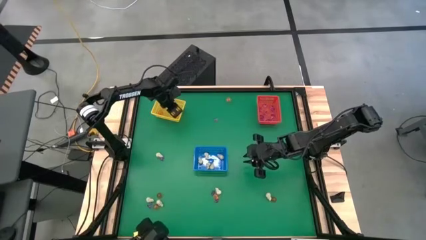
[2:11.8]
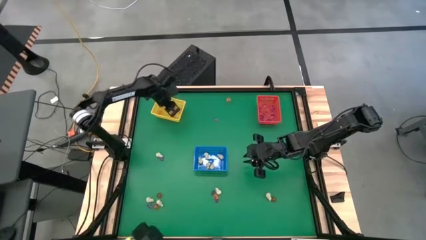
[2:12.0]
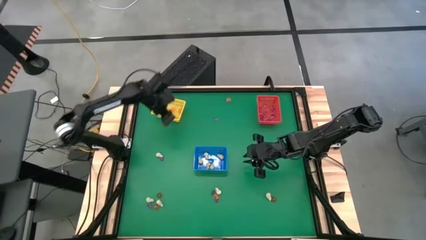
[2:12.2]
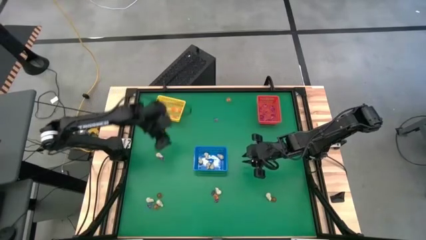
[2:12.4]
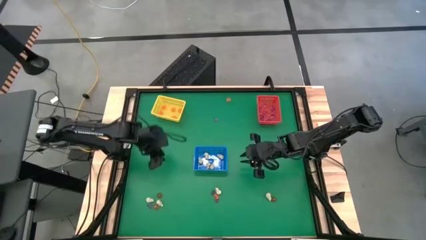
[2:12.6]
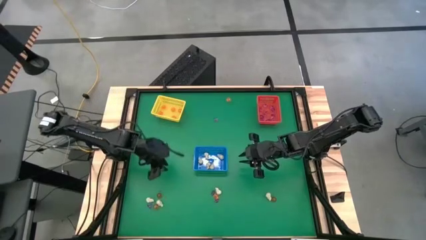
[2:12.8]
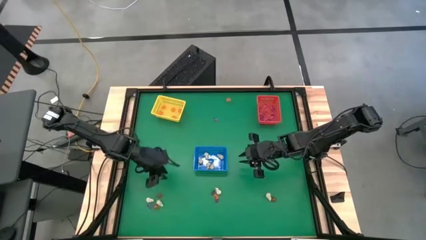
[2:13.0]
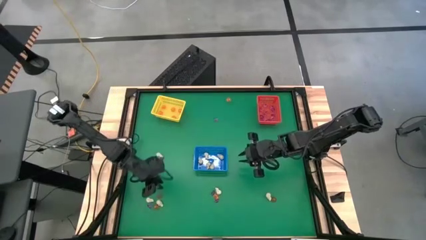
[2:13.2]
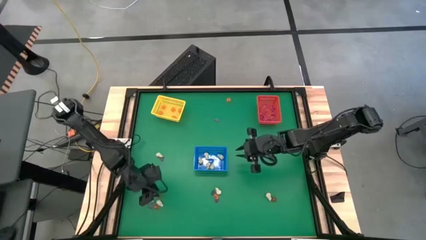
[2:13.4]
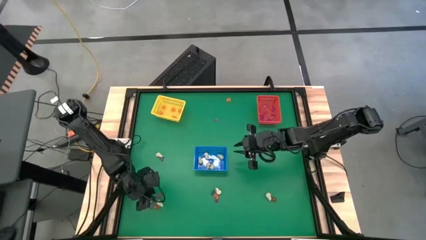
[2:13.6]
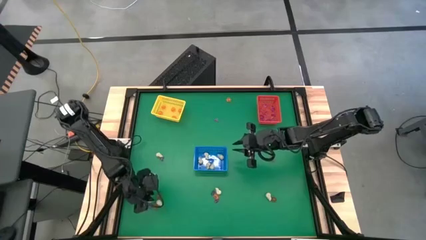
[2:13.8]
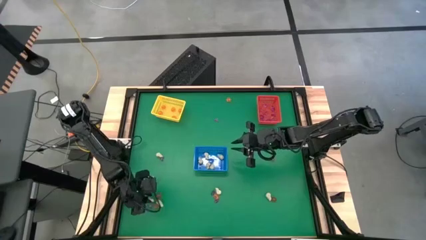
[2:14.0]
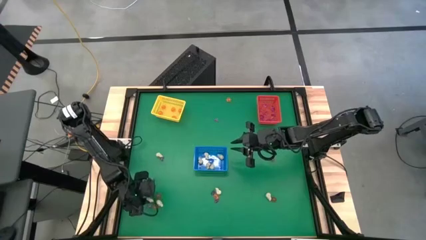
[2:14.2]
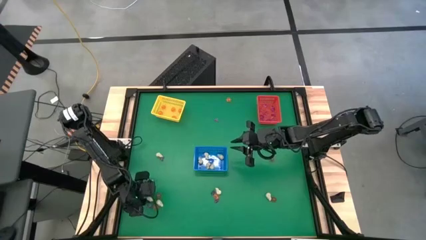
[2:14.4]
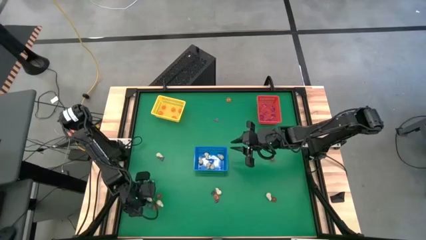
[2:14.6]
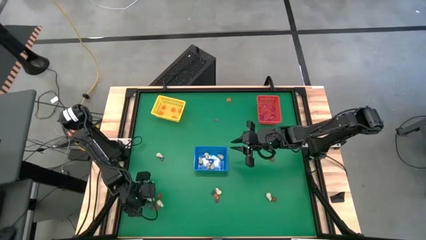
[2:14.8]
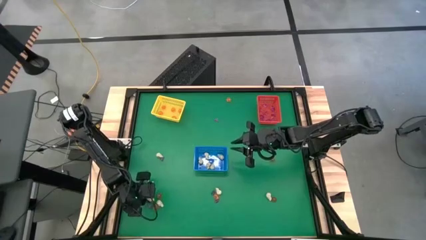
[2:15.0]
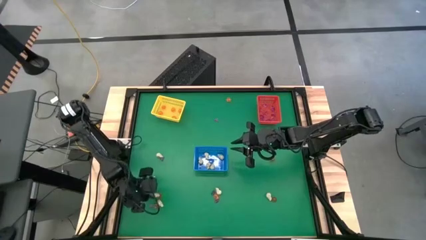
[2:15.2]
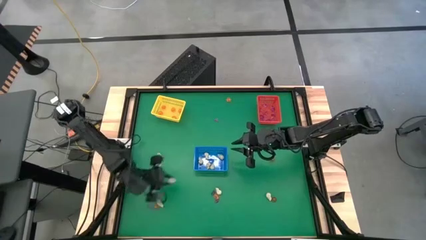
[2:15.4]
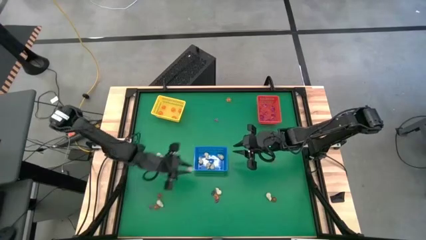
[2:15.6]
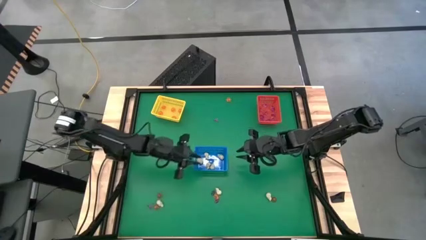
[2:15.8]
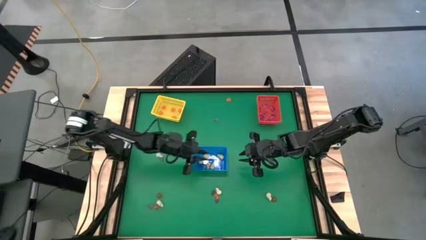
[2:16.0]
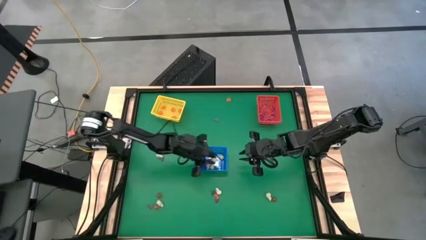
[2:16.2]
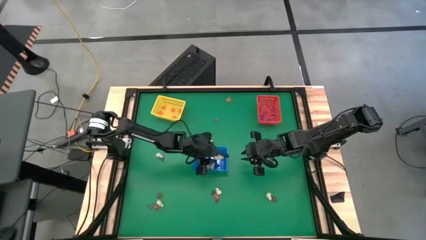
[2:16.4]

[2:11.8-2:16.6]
Task: Sort Halloween decoration
Put the white skull toy into the blue bin

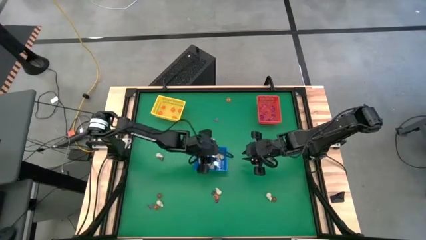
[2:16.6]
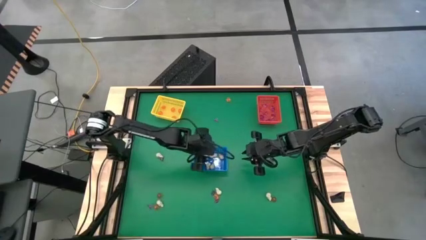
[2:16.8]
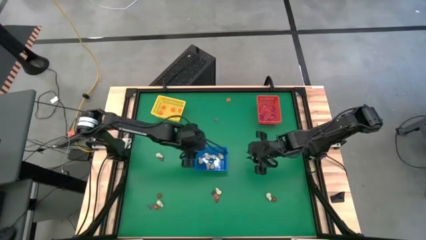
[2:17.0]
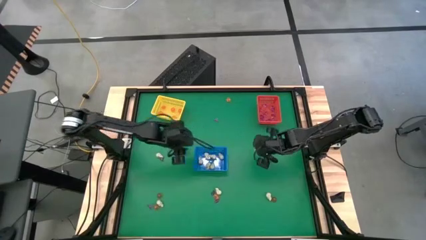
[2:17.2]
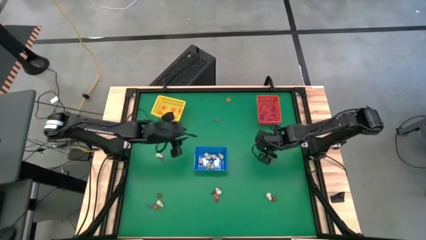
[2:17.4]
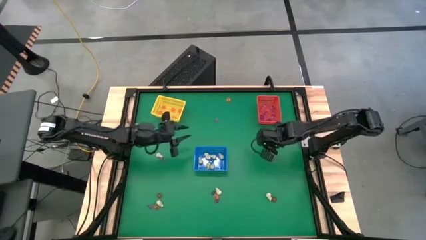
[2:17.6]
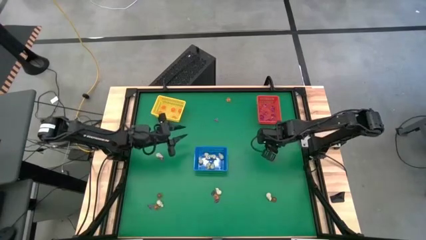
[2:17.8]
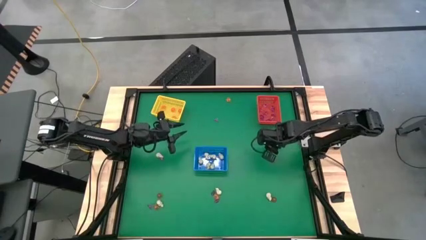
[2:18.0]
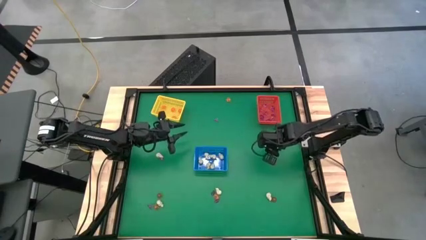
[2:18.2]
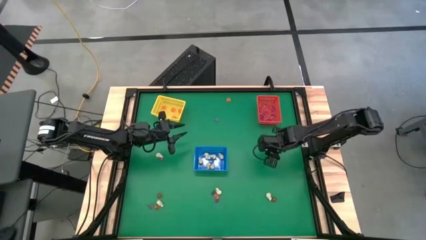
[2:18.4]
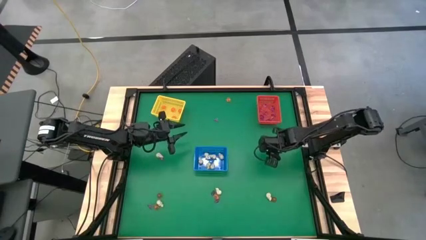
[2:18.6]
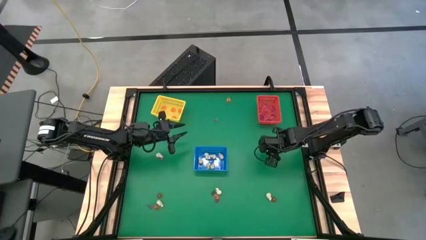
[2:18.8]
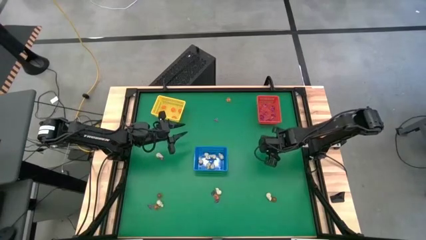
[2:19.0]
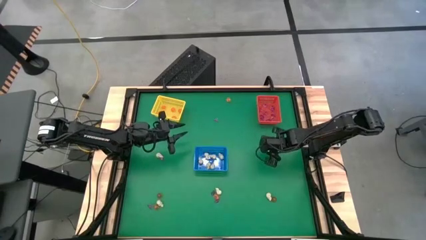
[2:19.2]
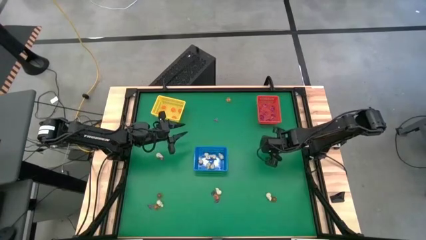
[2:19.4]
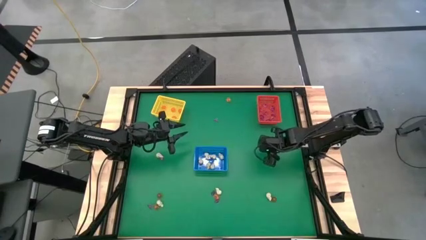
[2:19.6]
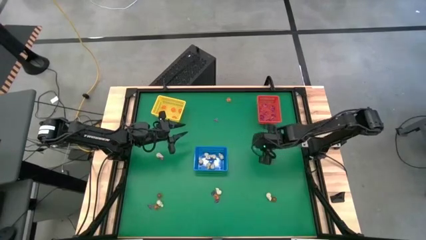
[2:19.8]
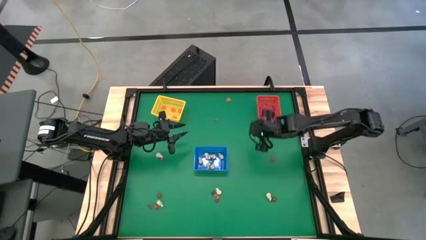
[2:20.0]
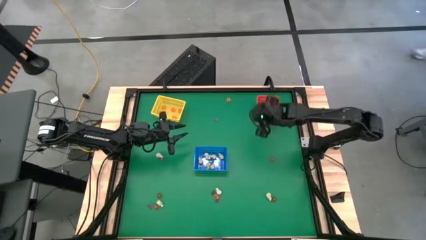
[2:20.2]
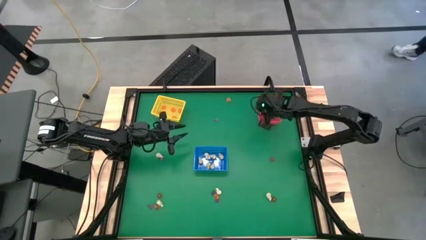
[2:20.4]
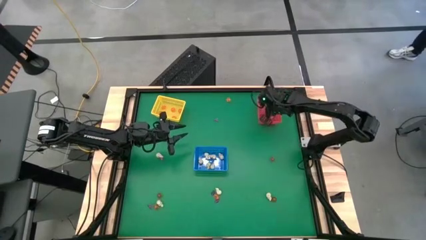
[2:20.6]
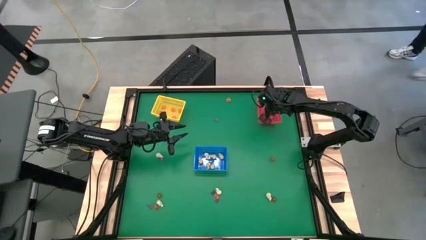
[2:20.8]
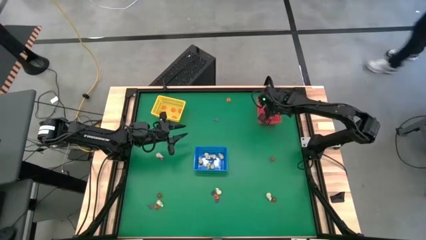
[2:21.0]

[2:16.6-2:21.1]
Put the purple witch hat toy into the red bin

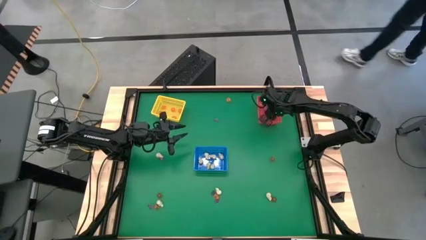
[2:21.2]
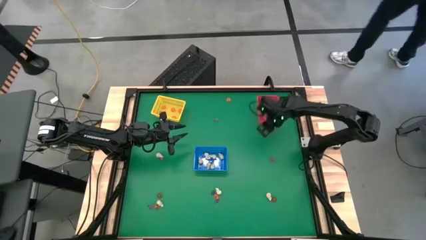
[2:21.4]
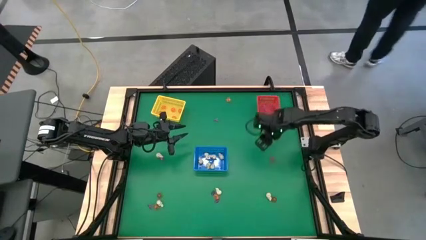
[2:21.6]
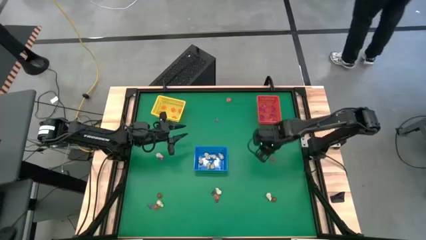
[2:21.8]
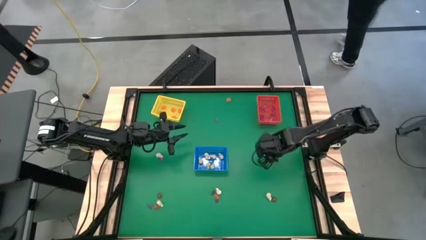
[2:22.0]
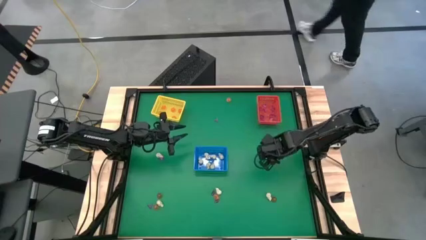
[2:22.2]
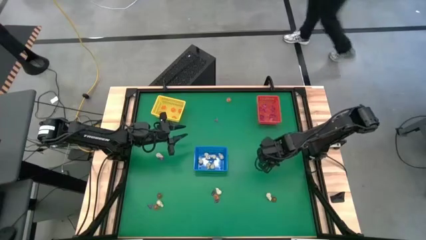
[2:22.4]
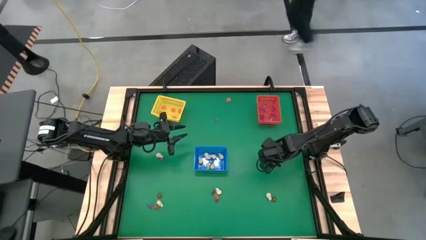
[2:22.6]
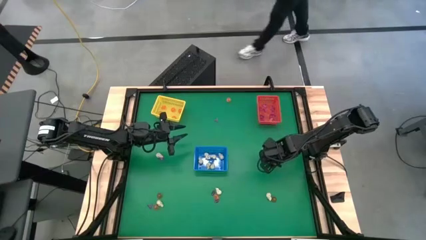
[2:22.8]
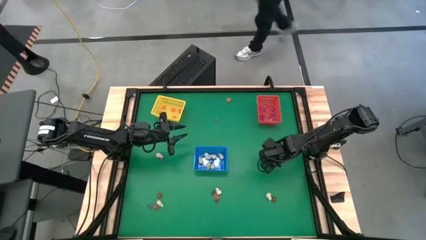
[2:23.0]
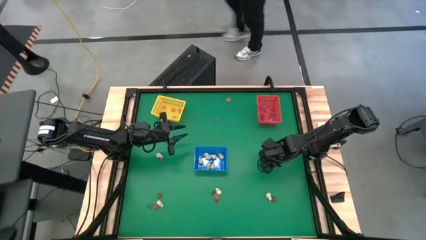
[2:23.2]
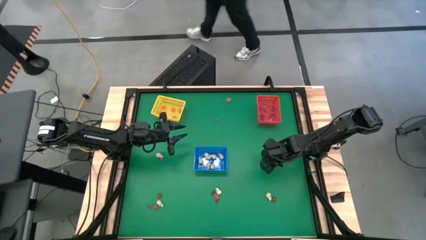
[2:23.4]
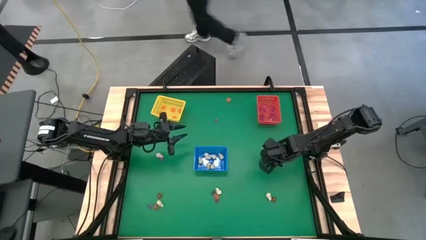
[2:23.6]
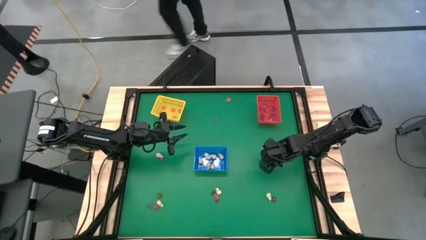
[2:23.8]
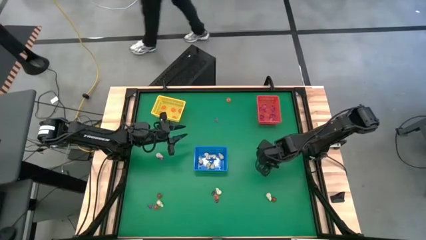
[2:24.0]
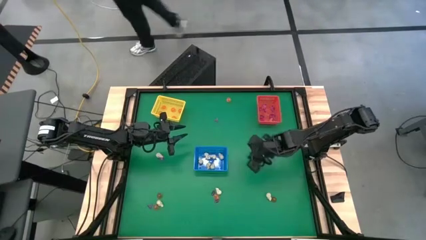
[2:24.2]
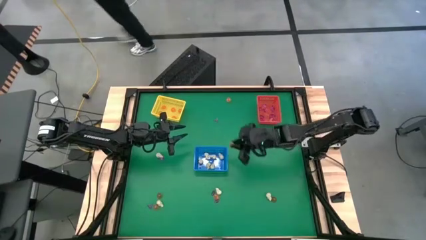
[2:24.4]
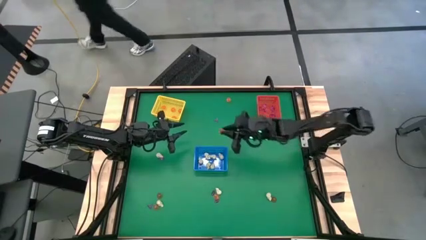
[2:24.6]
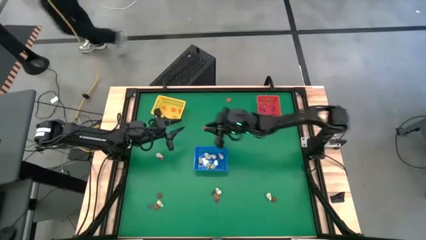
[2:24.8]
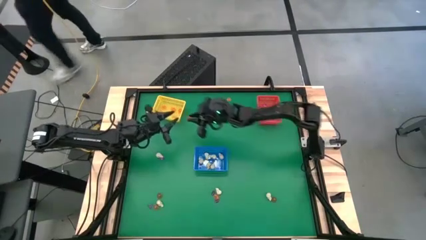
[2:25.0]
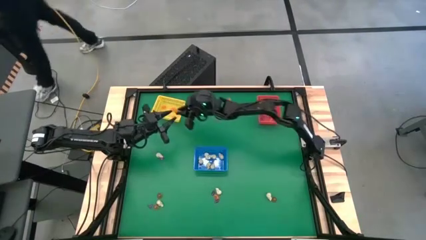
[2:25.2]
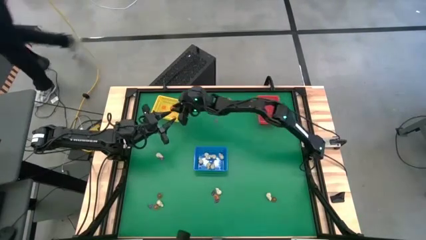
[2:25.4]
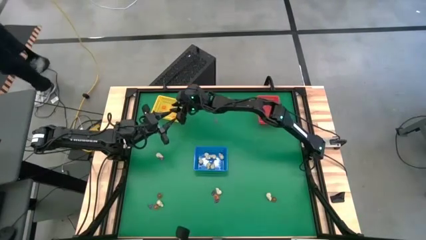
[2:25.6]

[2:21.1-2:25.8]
Put the orange pumpkin toy into the yellow bin

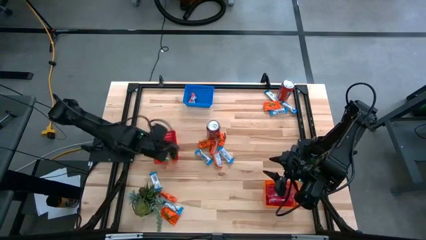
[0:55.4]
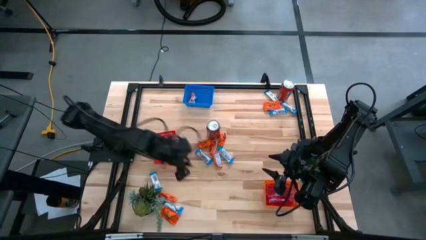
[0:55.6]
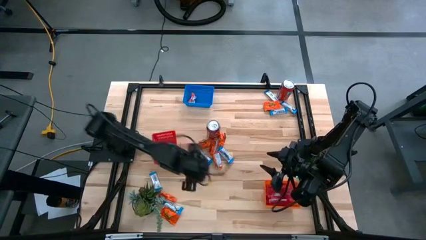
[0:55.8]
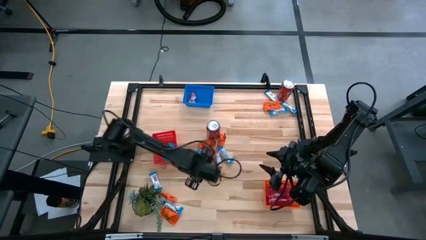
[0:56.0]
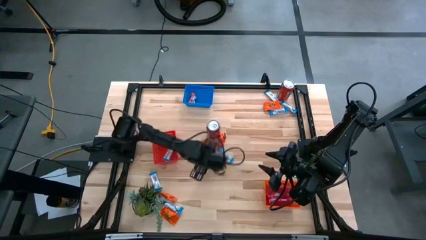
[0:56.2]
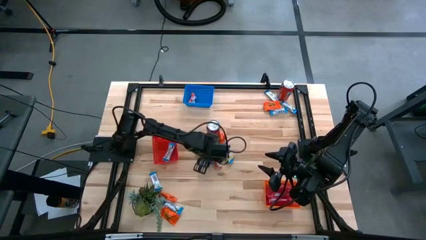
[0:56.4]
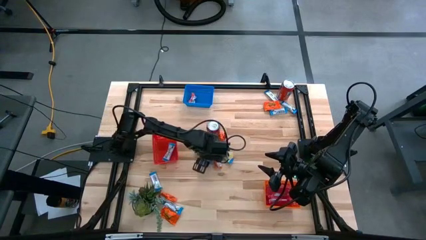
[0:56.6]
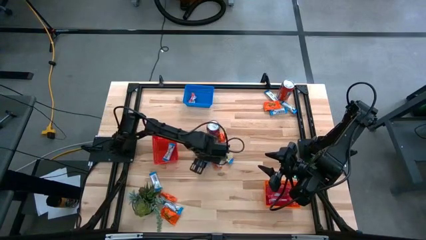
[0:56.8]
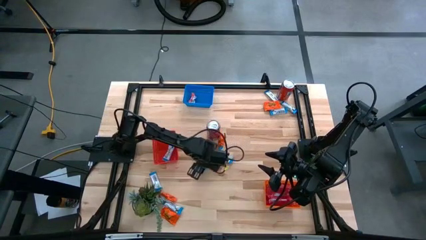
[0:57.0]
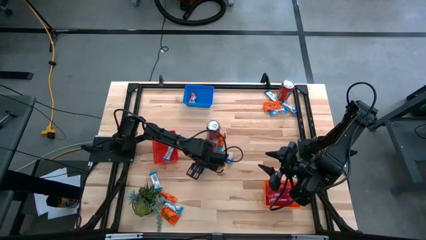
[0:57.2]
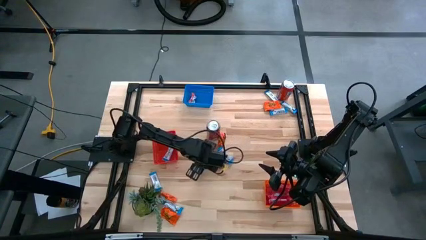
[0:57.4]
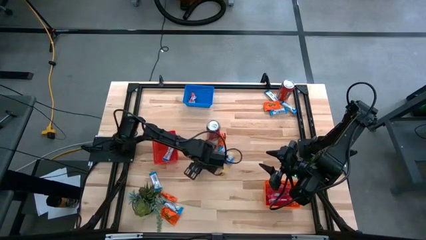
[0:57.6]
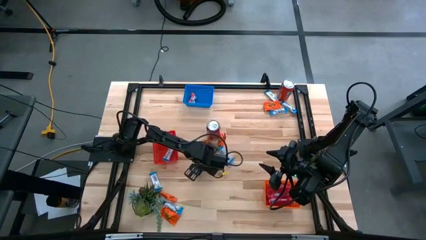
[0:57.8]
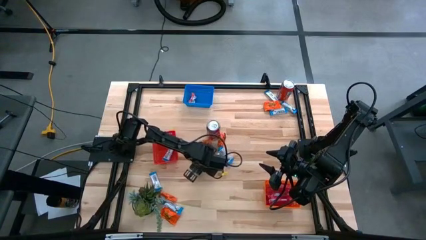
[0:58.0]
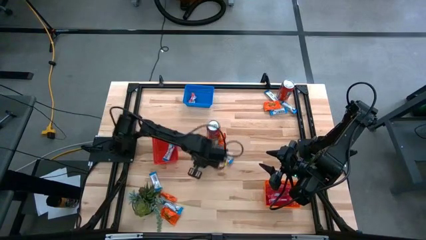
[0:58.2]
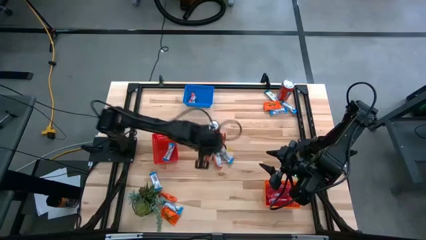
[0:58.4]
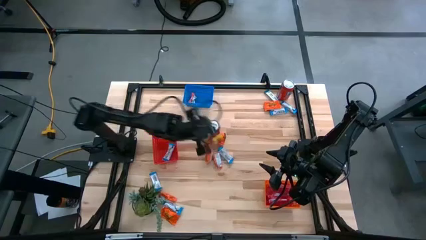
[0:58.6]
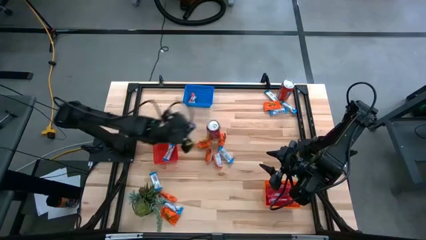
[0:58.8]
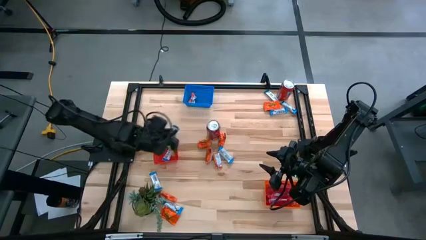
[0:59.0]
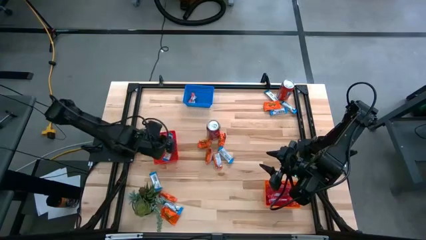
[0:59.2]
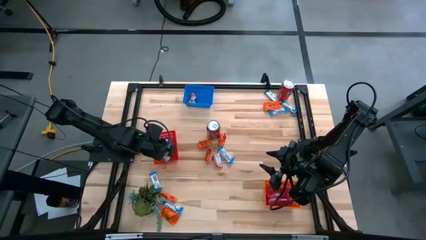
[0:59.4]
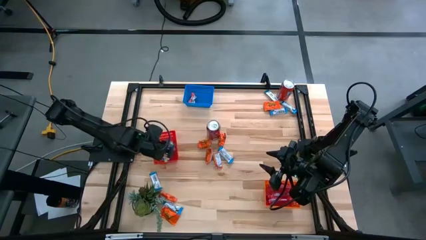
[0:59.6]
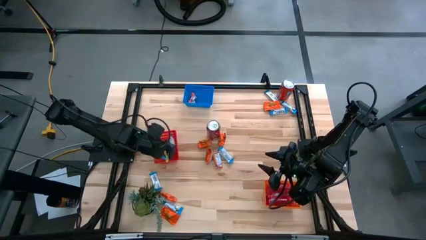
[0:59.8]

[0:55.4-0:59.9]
Task: Sort candy
Put the white chocolate into the red bin
